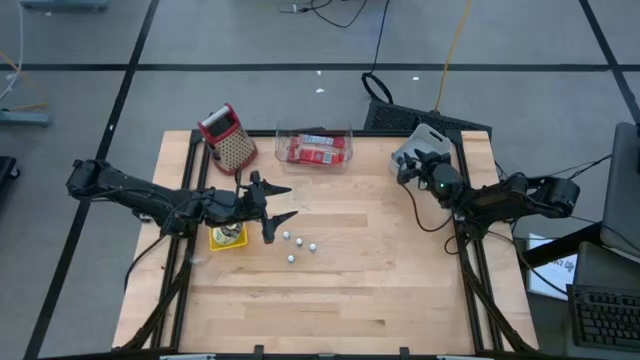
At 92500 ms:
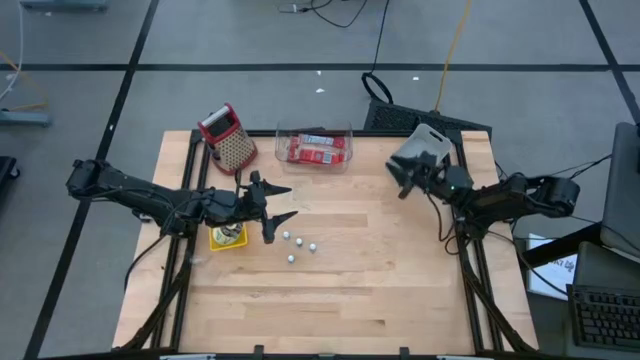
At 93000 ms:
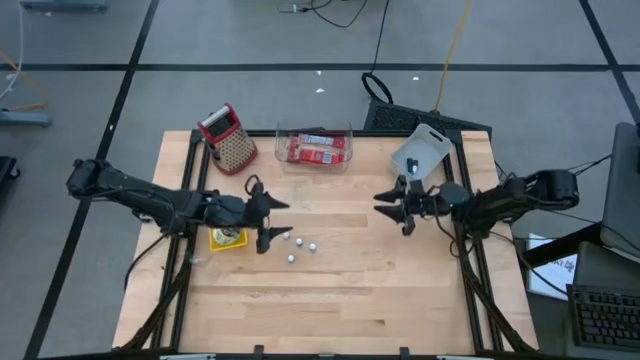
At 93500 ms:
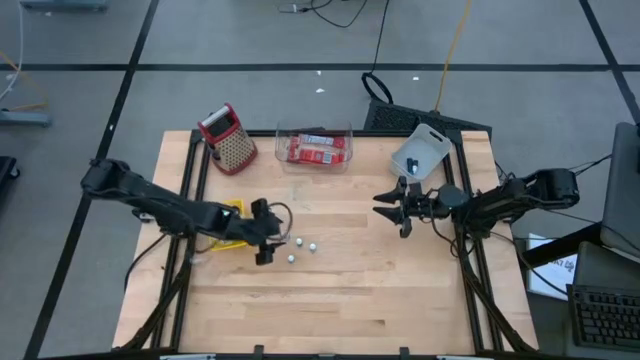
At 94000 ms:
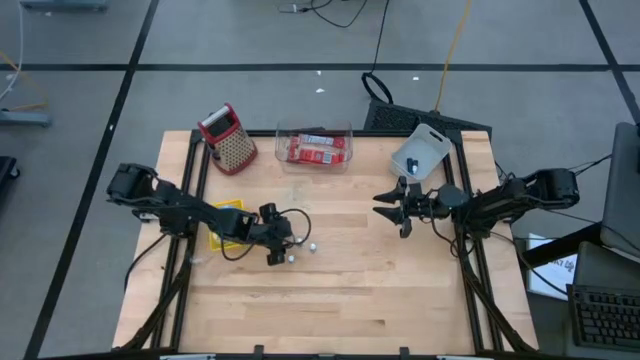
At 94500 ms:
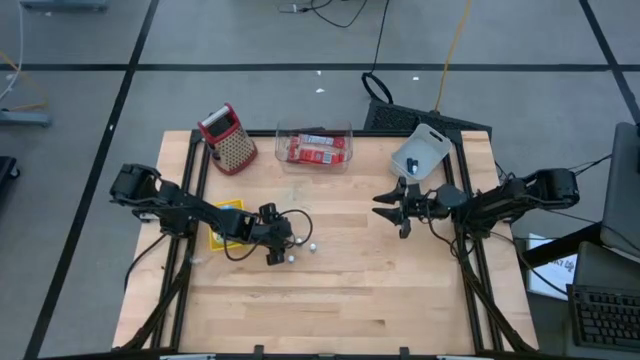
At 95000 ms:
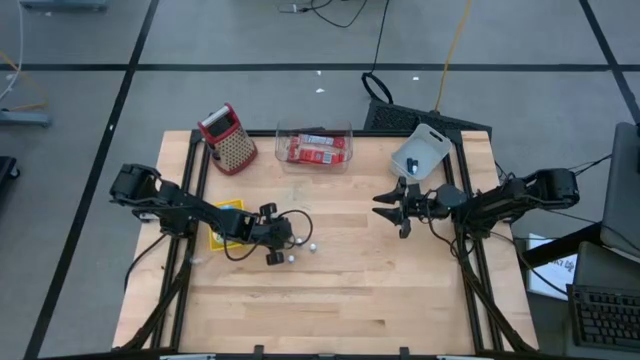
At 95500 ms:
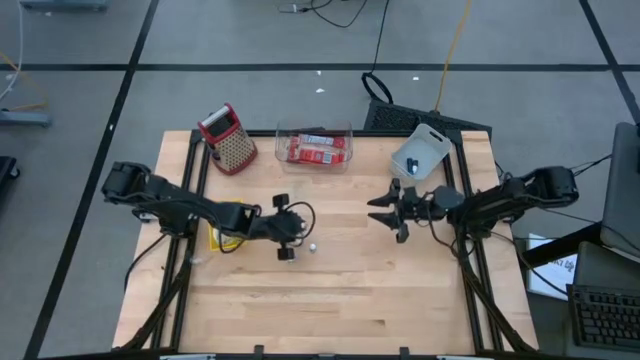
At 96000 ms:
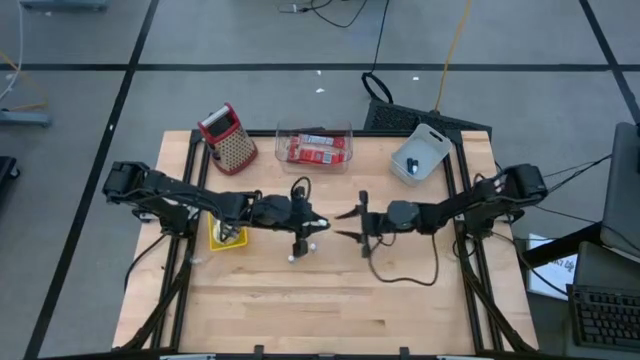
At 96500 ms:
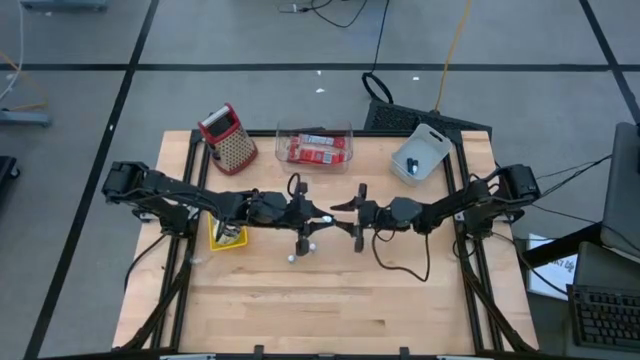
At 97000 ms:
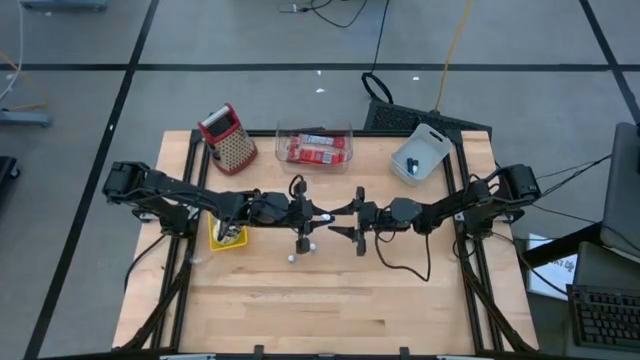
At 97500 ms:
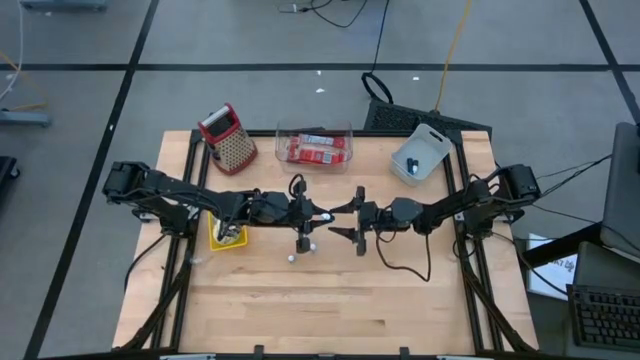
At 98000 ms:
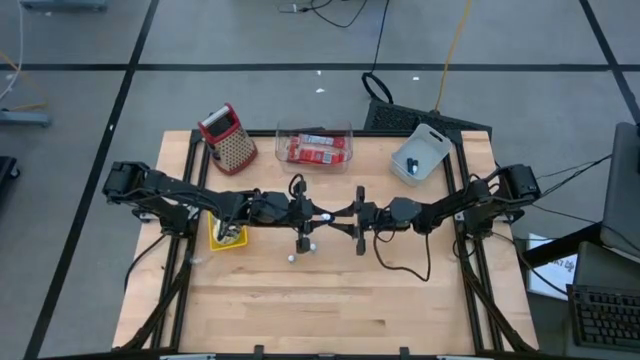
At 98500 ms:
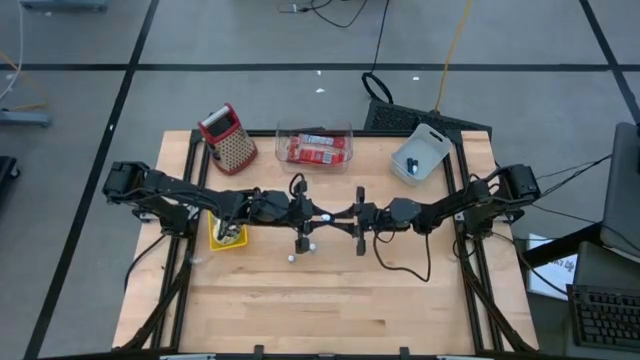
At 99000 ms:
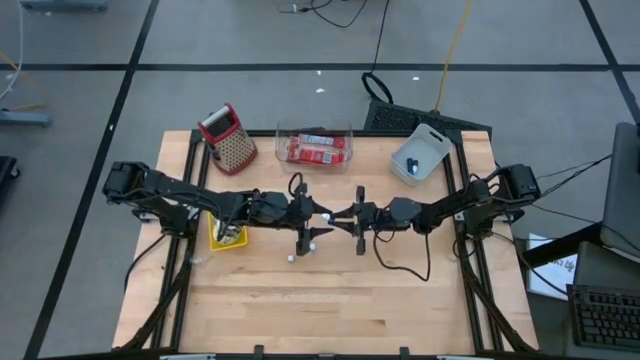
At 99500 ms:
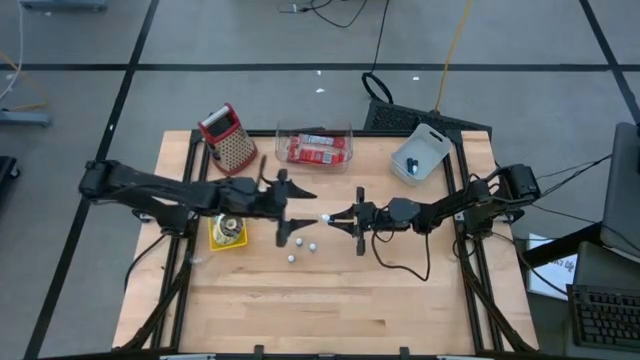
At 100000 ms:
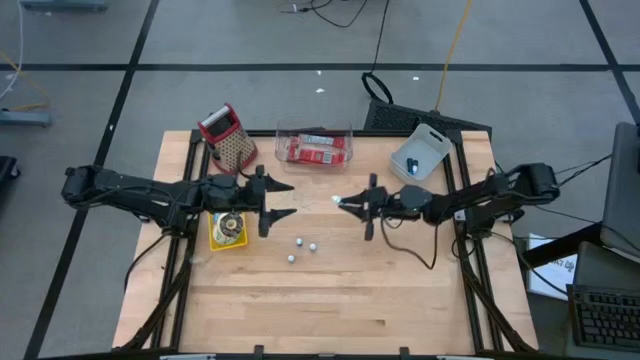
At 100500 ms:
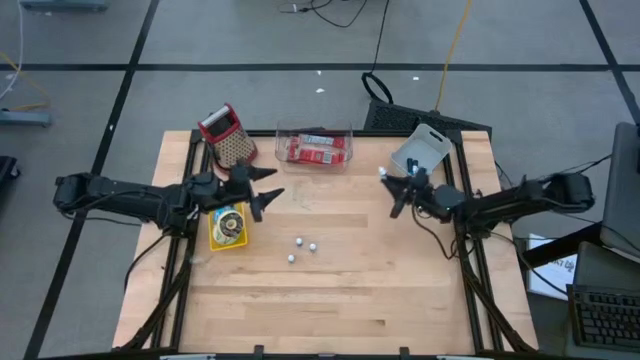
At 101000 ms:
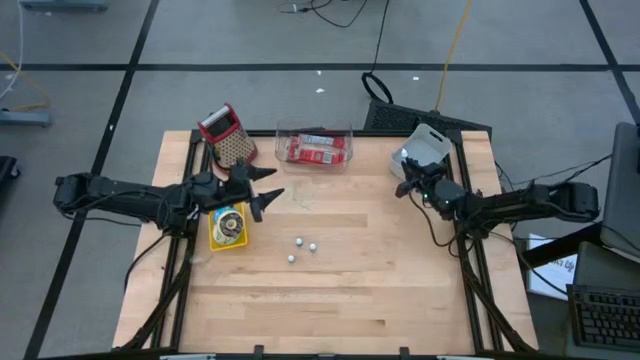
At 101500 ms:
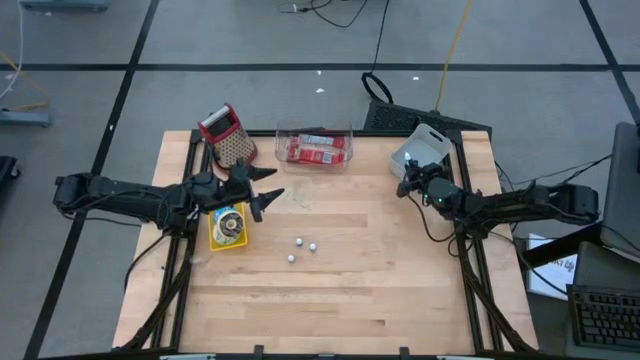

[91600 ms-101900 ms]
Put the left black food coloring bottle into the white bin

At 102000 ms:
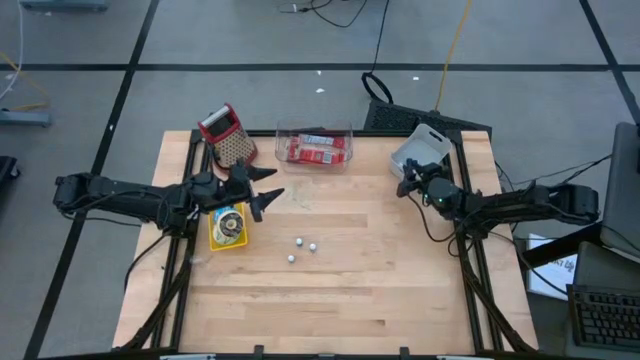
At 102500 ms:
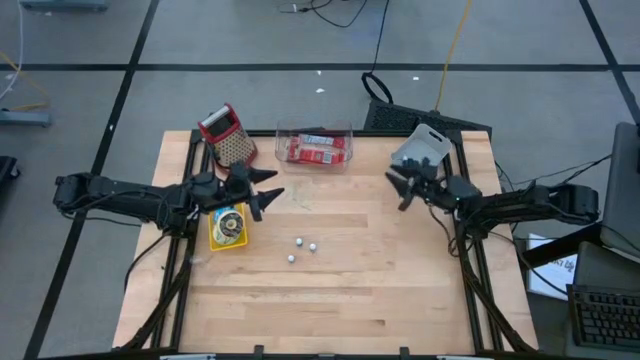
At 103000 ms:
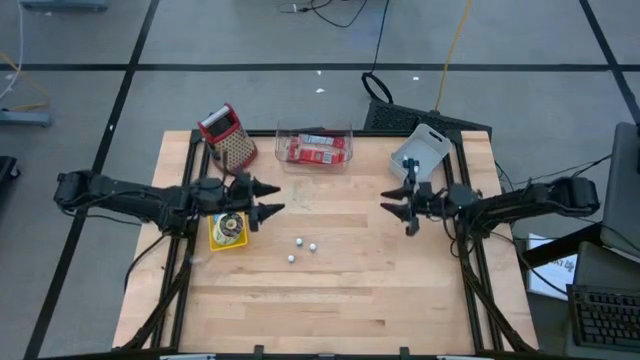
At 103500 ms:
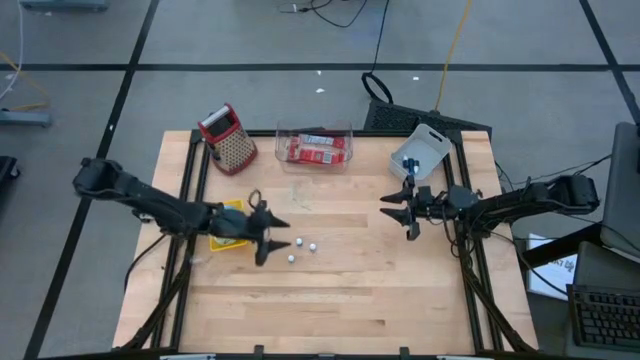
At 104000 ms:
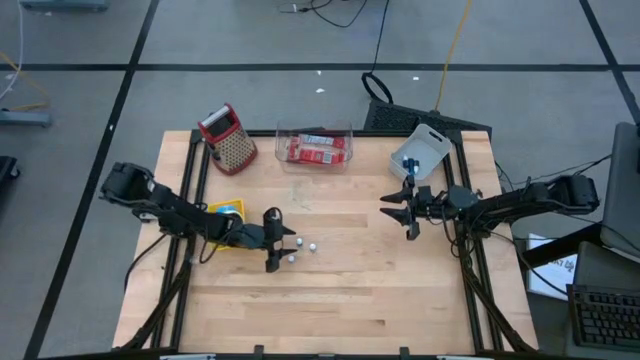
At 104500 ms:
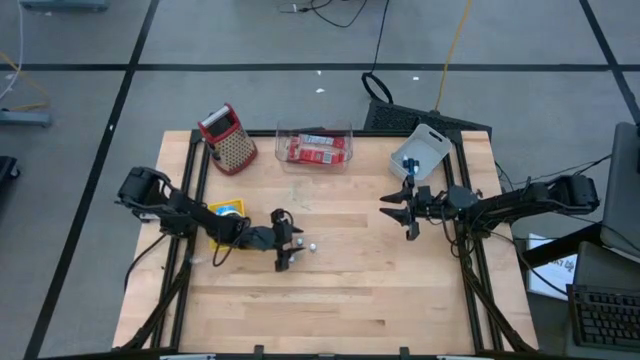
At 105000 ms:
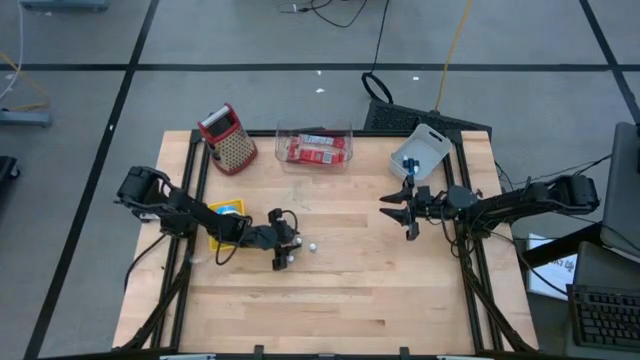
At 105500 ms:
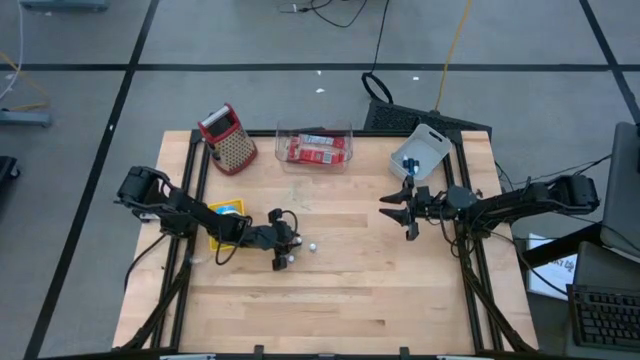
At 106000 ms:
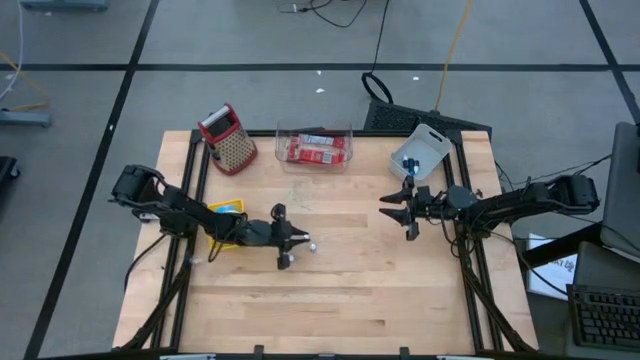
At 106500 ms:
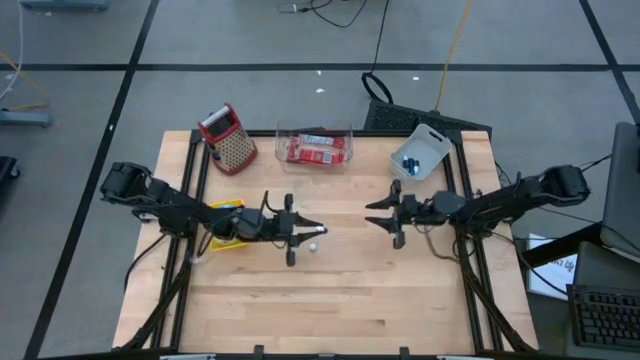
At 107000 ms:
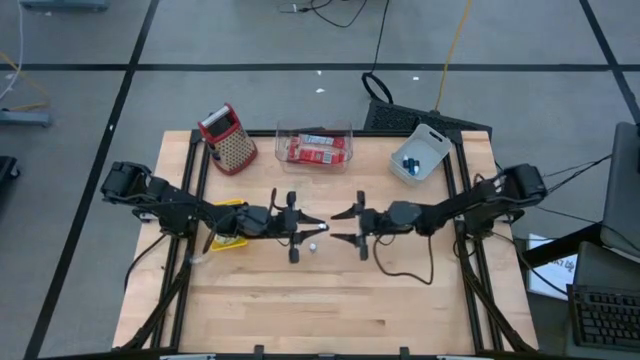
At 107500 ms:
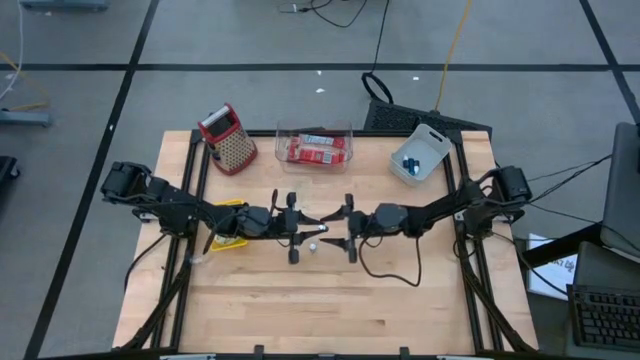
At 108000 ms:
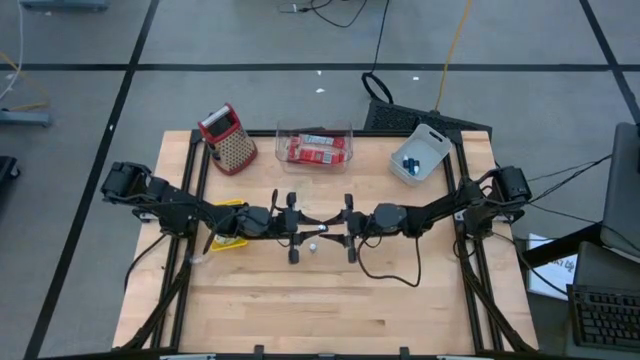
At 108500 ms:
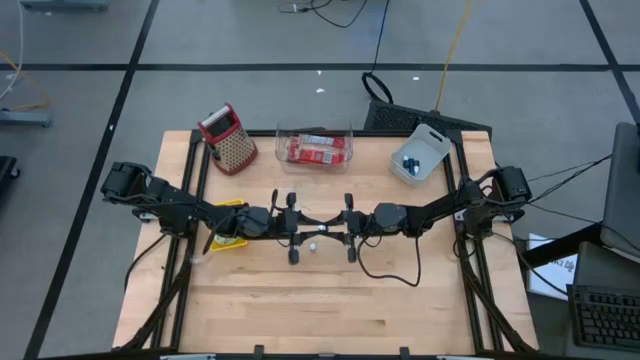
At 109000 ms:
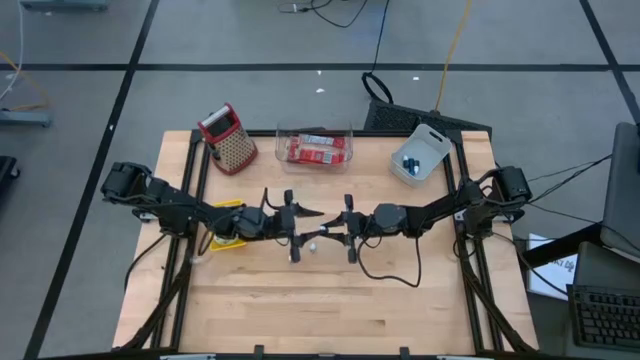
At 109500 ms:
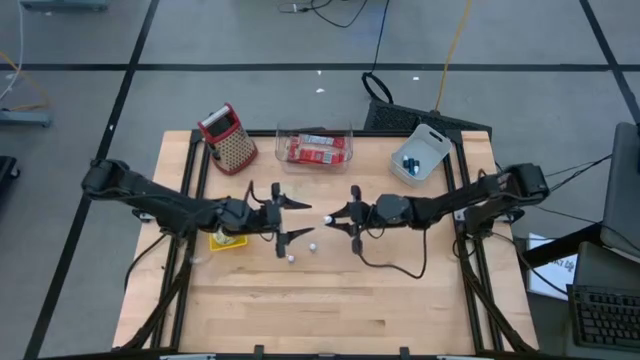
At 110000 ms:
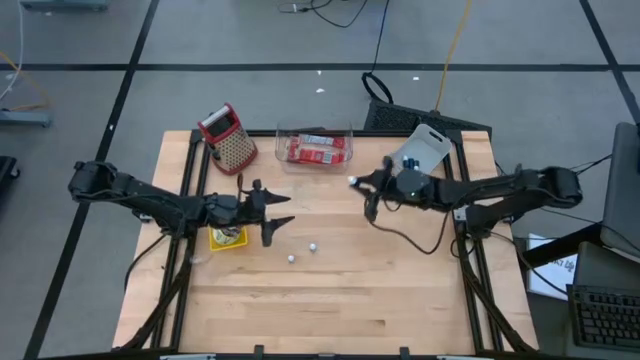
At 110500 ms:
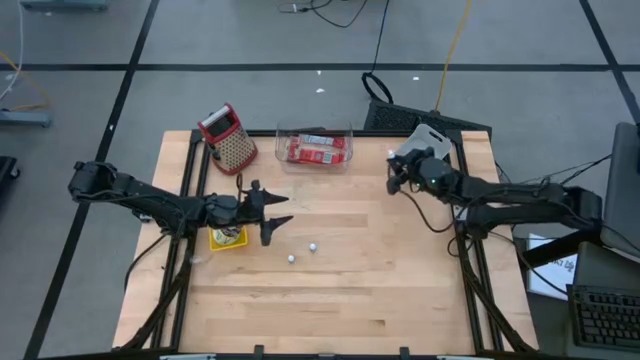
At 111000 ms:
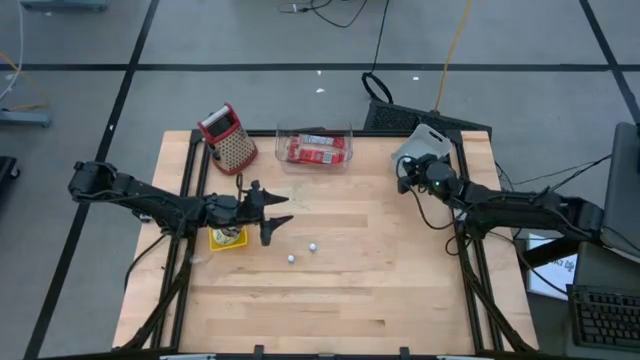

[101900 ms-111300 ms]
Put the top green food coloring bottle into the white bin
